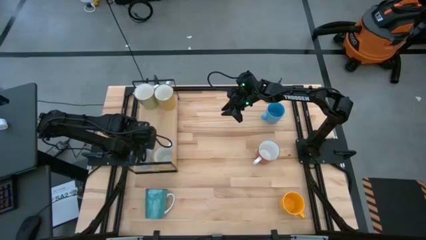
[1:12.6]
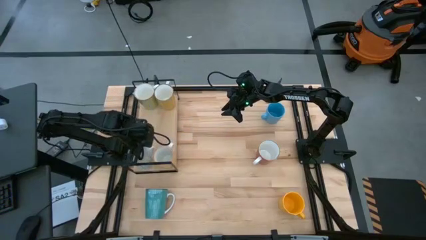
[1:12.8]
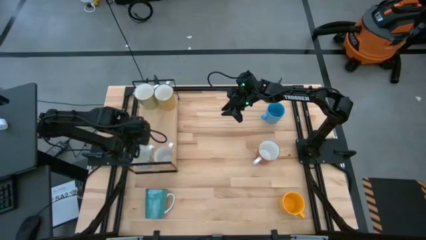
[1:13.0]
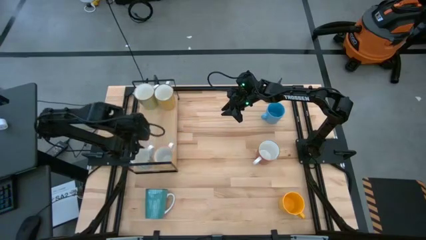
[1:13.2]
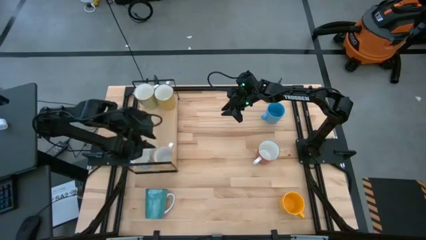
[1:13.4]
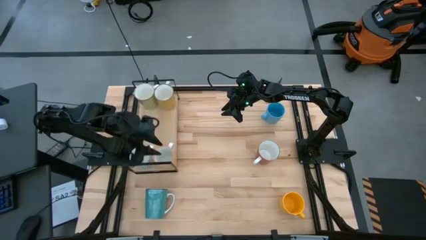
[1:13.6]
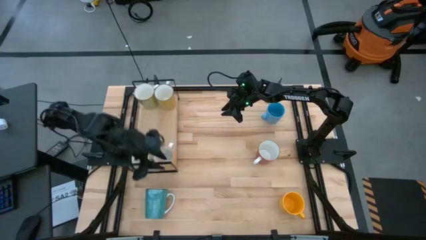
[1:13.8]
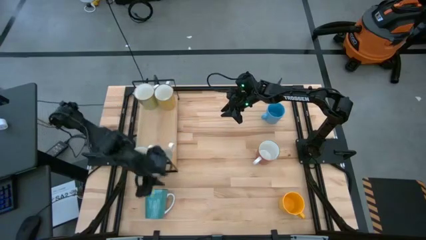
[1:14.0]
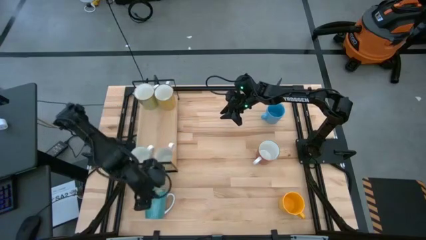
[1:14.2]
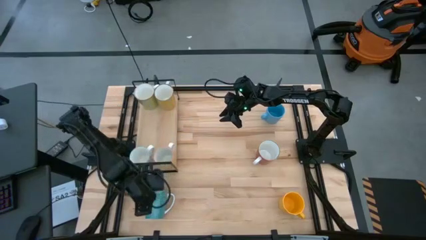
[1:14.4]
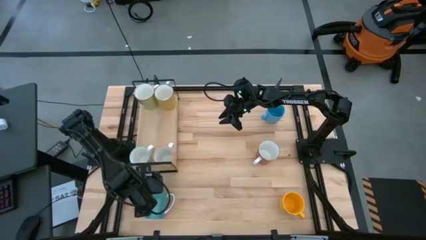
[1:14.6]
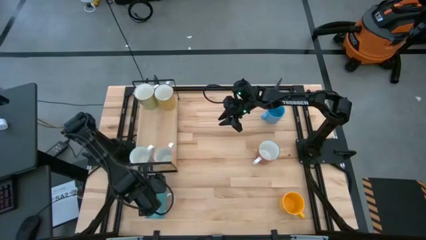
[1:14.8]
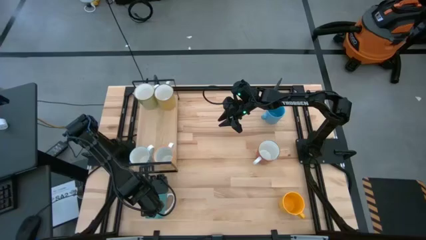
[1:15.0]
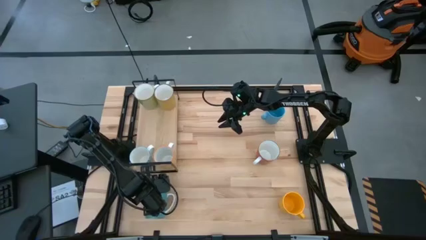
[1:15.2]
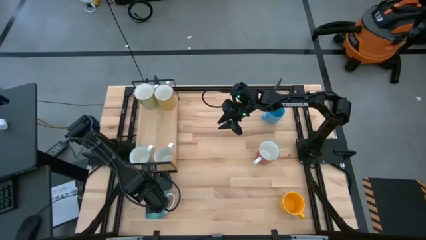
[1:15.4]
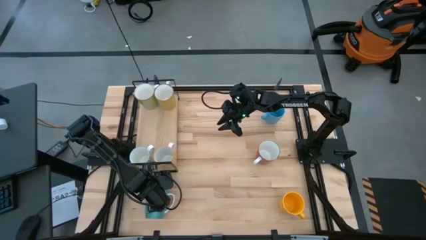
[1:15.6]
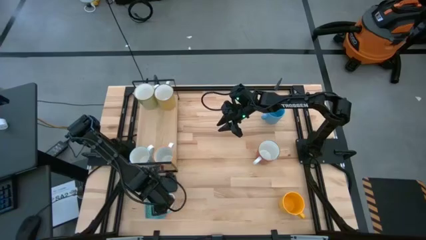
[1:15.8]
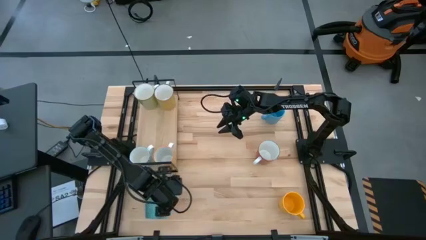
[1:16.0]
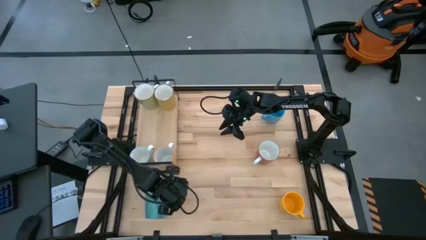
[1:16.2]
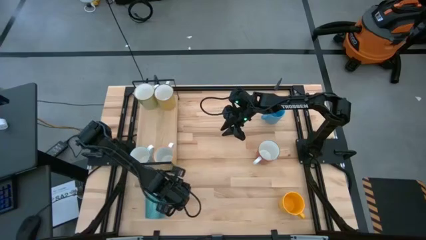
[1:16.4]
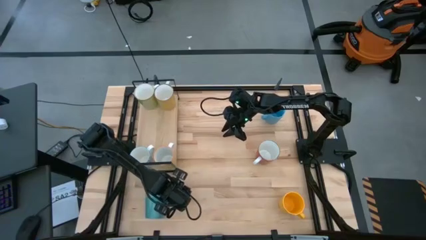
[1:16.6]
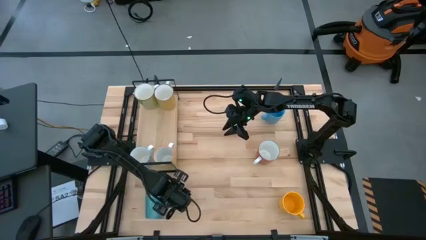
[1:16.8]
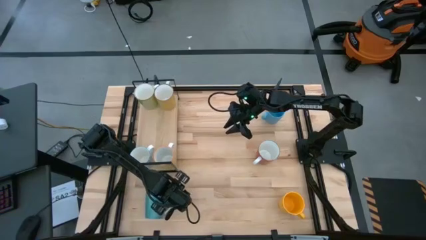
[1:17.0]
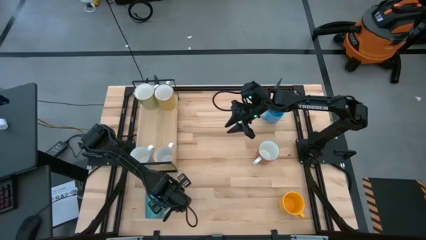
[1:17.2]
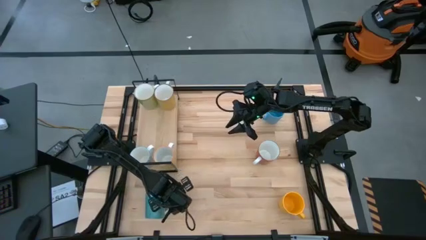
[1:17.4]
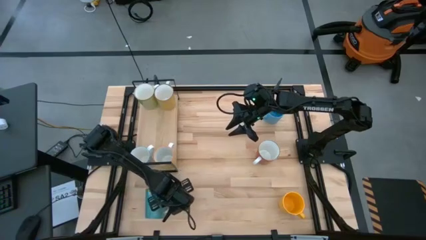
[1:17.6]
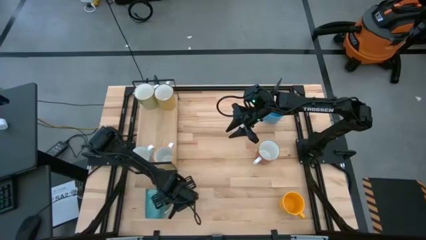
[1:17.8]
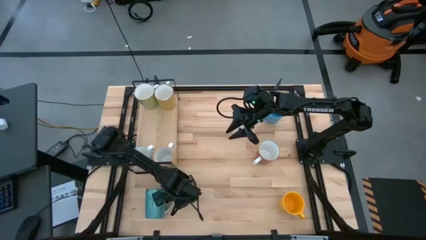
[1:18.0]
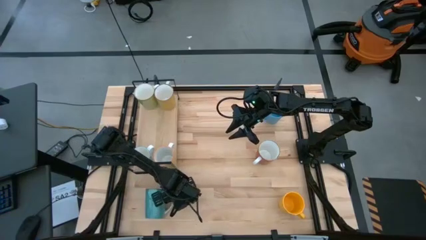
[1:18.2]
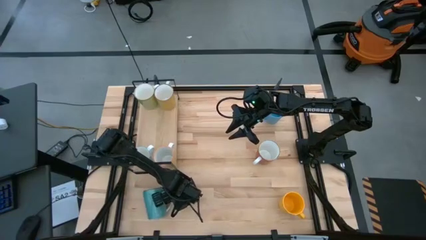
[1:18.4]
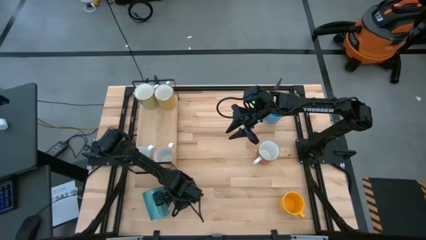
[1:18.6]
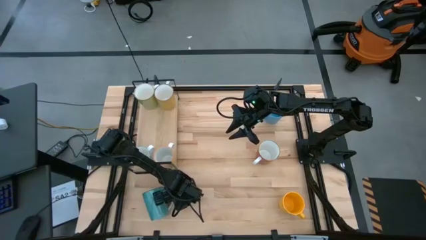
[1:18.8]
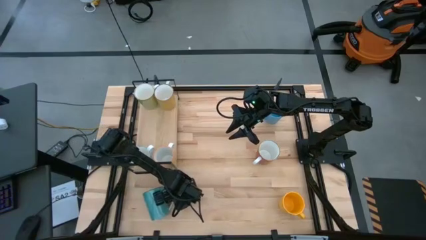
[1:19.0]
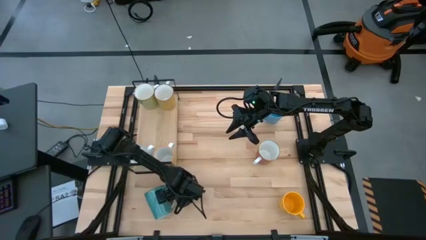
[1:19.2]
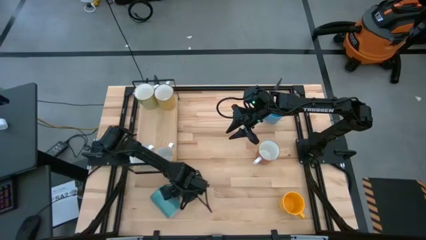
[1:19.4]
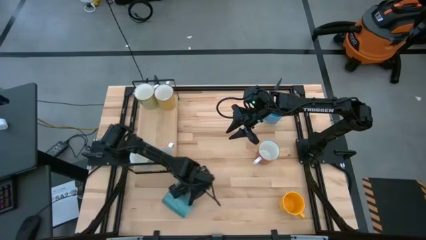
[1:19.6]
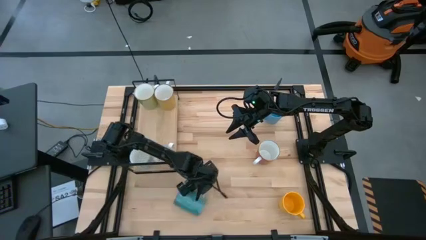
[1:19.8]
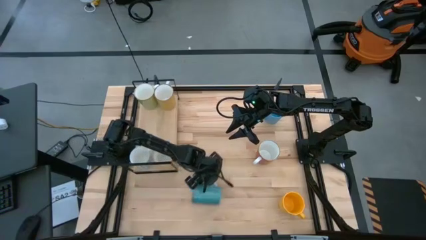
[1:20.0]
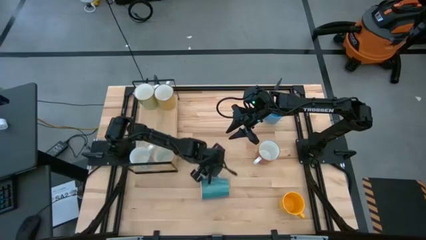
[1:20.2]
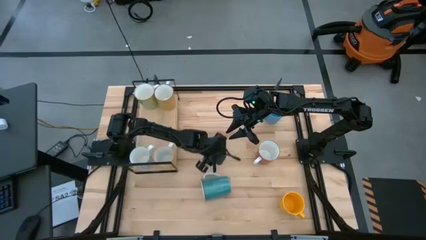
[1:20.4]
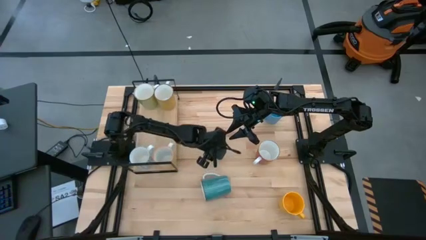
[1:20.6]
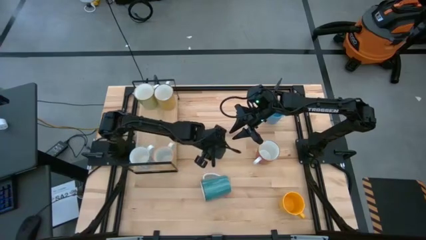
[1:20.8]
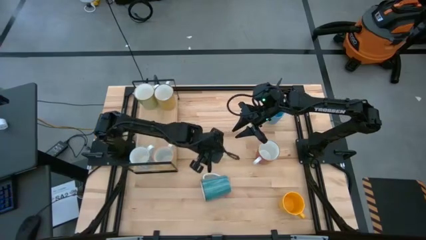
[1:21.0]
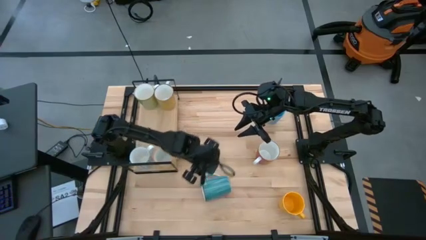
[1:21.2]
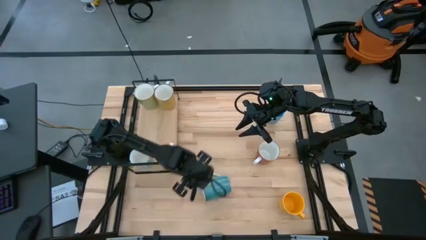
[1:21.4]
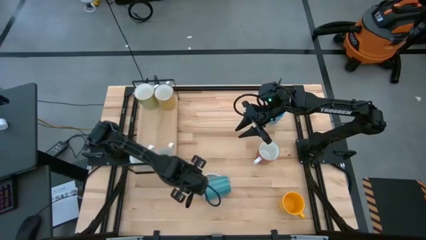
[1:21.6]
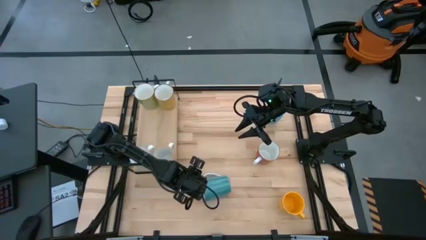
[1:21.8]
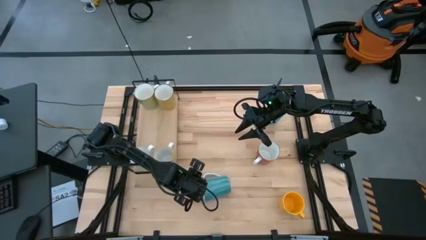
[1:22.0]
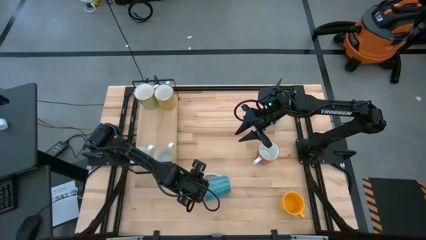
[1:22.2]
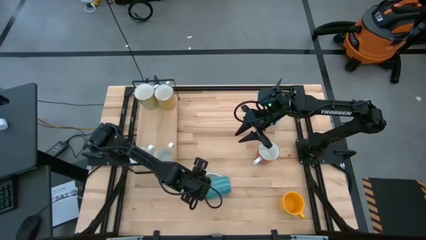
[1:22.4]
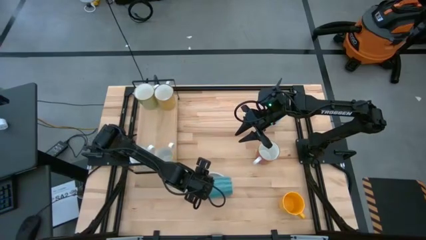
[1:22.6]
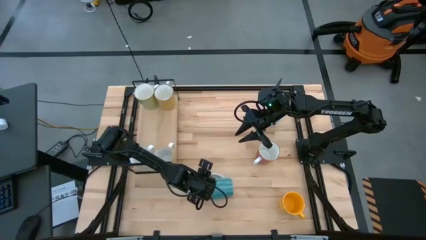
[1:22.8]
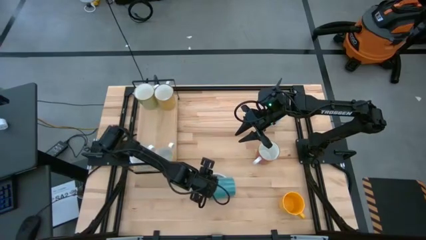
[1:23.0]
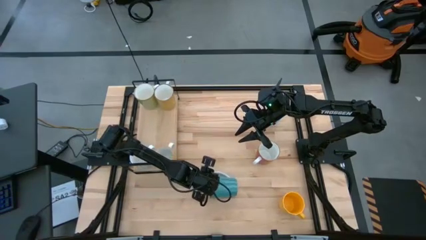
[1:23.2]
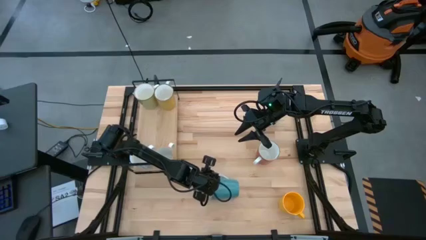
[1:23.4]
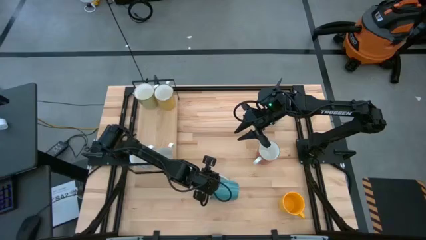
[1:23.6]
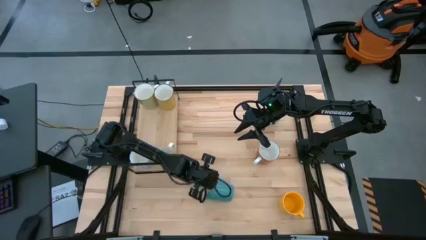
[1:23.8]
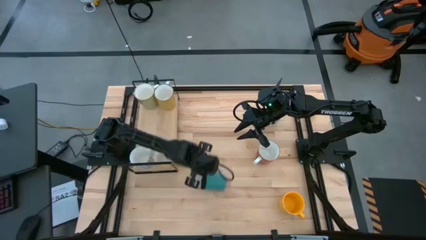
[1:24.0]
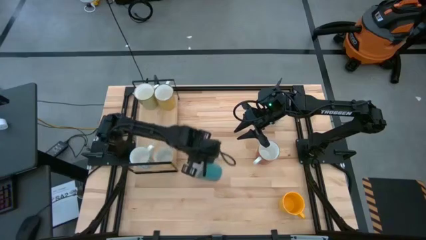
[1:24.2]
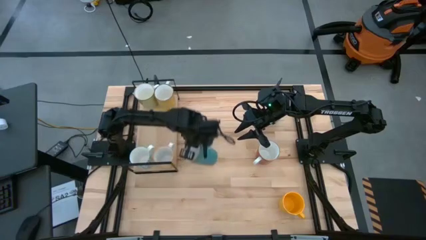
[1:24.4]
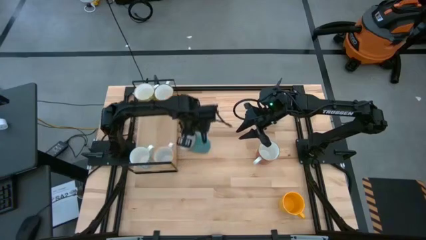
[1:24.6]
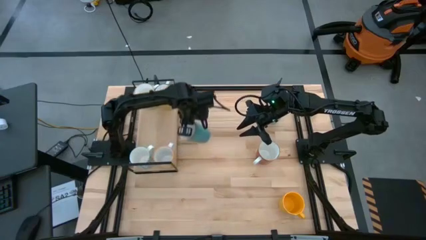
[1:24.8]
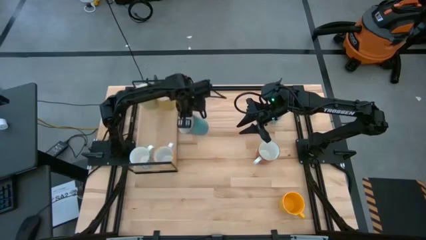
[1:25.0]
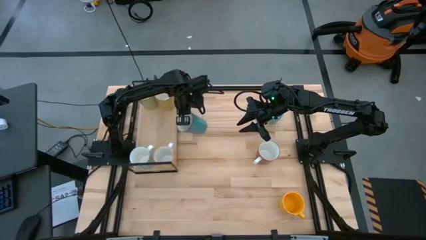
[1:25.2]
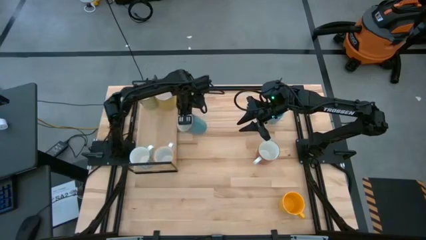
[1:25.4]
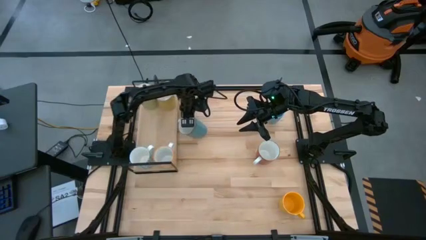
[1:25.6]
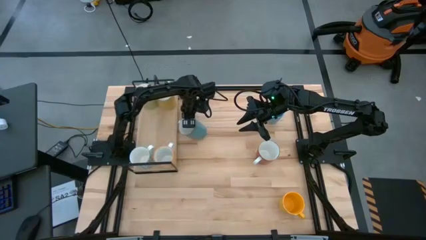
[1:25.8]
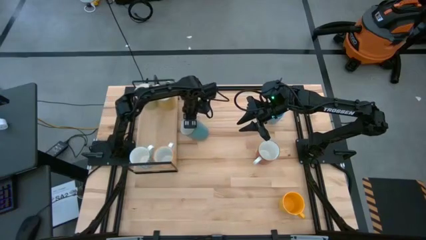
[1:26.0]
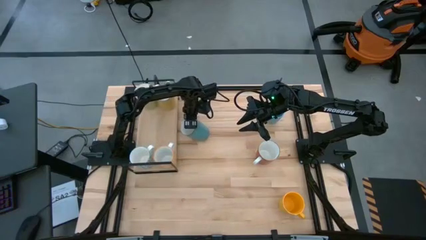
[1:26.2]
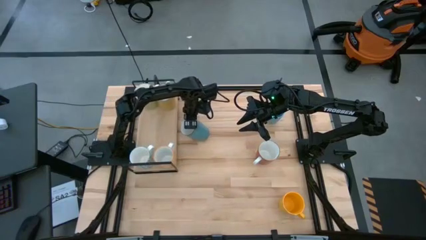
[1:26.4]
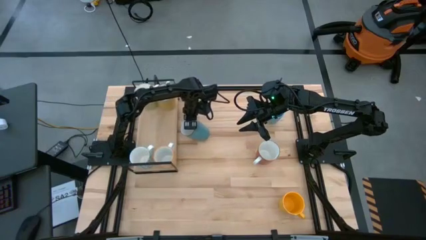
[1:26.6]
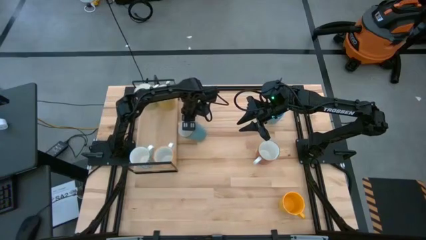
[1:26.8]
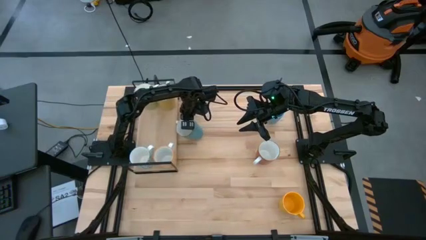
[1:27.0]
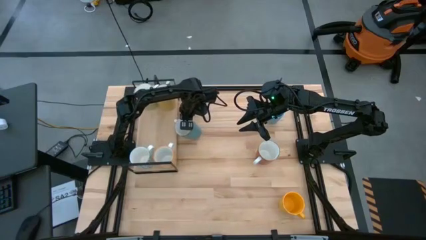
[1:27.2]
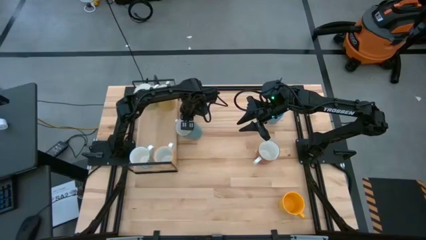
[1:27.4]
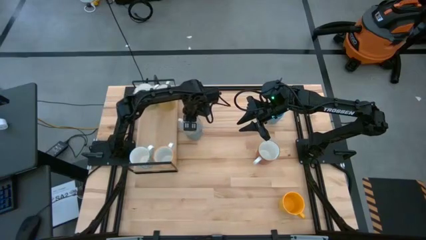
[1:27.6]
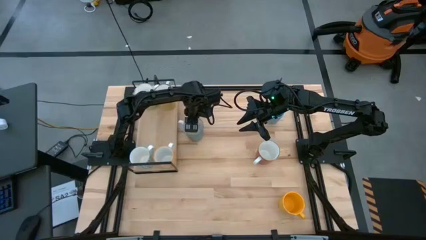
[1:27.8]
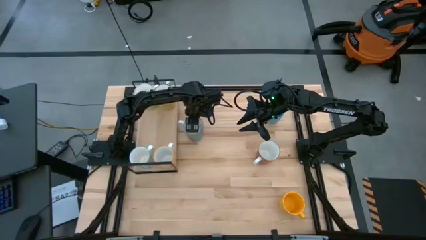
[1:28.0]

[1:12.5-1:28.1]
Task: Place coffee mugs
Move the light blue mug to the center of the table

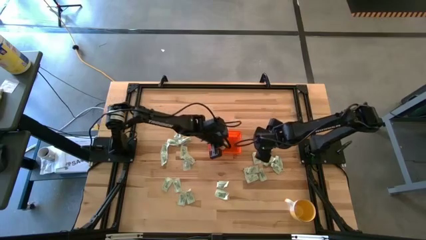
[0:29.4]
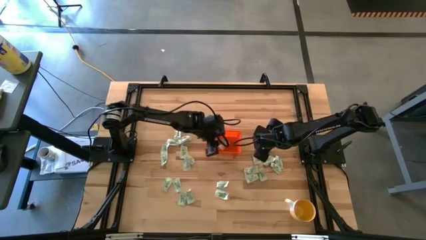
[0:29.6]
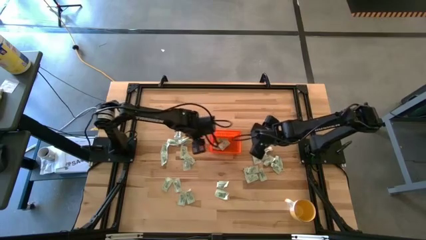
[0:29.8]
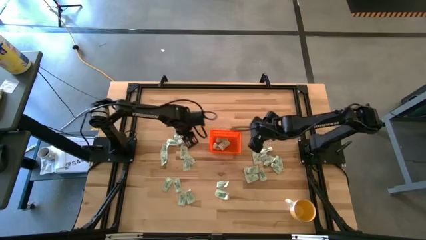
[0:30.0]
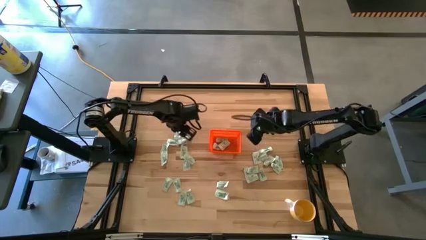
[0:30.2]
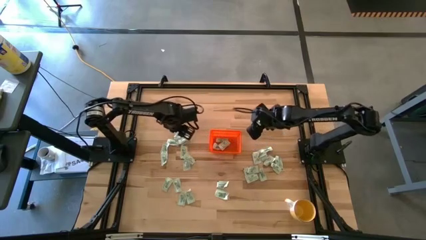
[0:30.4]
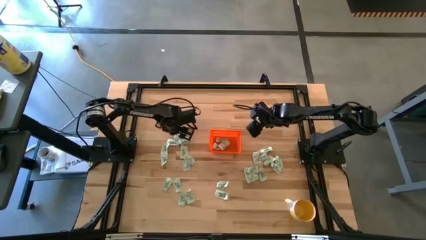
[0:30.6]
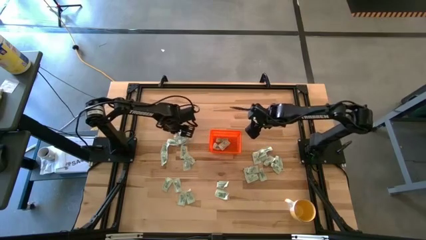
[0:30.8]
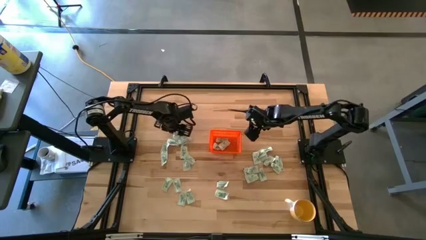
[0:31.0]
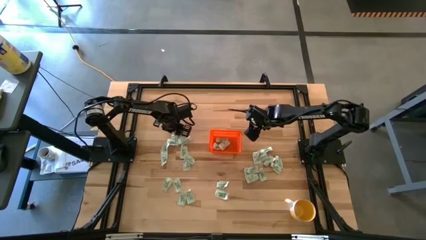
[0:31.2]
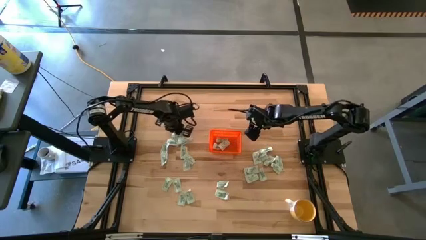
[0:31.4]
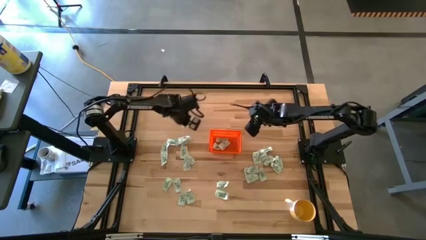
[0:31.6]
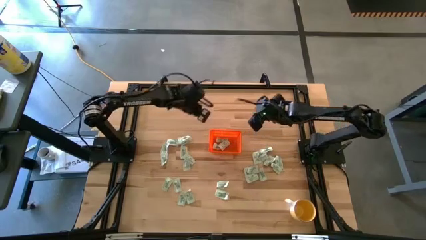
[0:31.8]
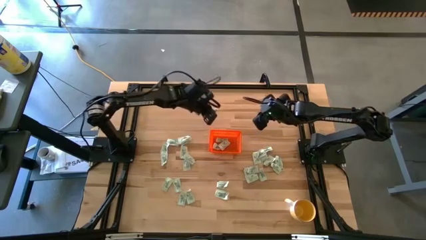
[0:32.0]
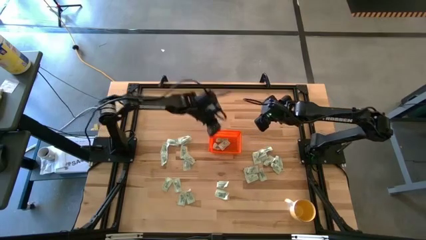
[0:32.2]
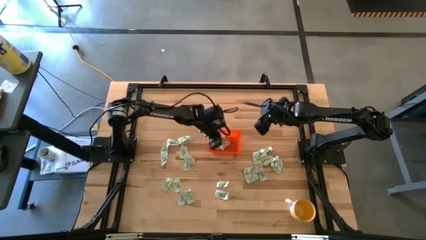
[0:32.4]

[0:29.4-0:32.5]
Task: Pick and place Stevia / Truvia into bins
Put the light green stevia packet into the orange basket
